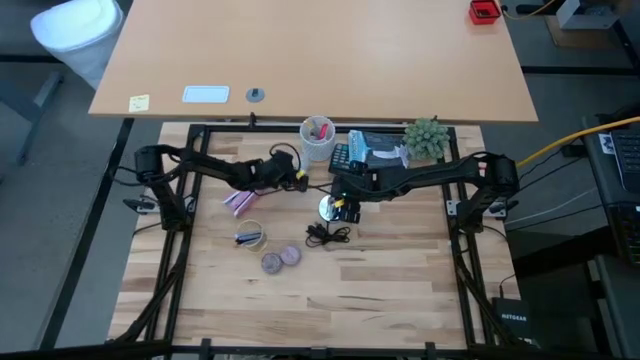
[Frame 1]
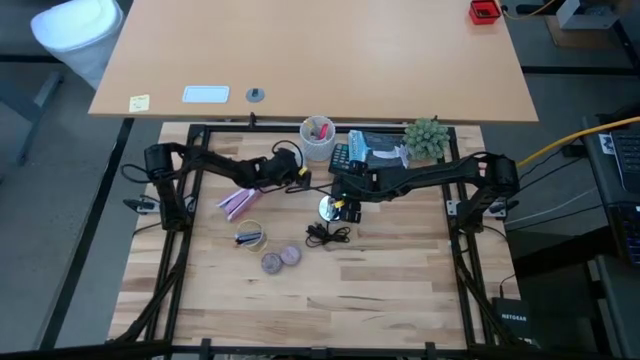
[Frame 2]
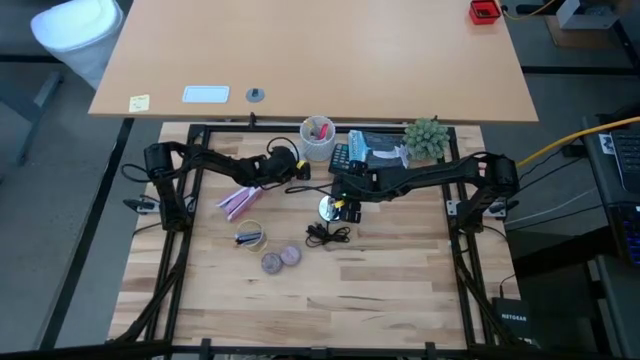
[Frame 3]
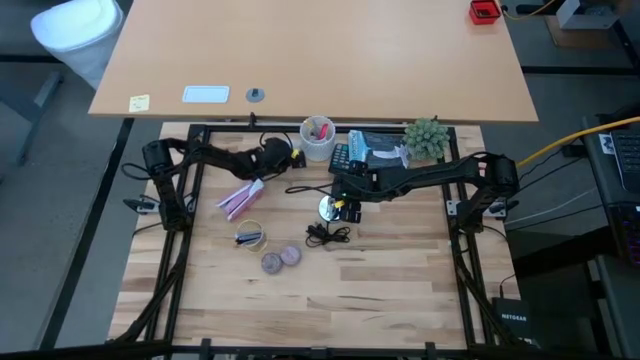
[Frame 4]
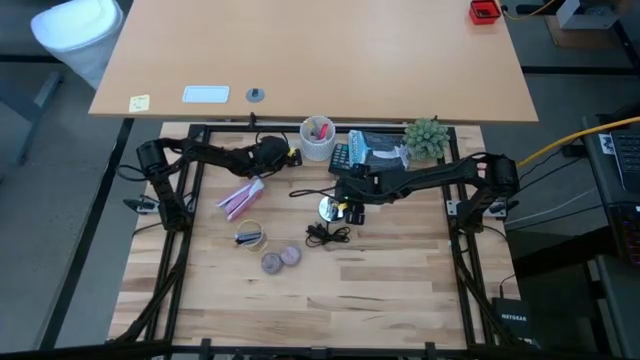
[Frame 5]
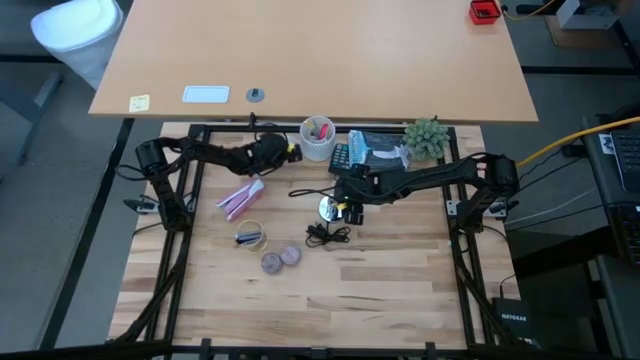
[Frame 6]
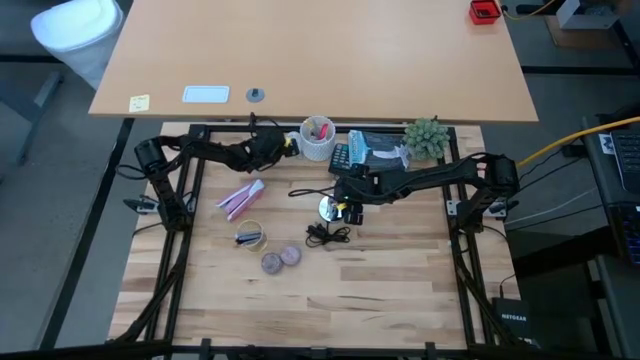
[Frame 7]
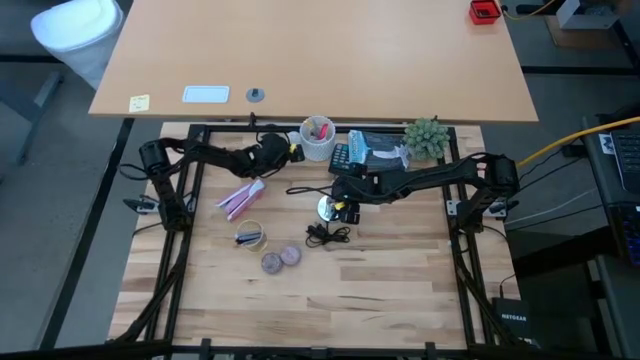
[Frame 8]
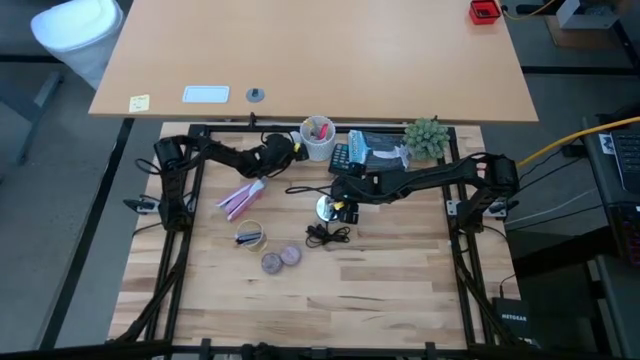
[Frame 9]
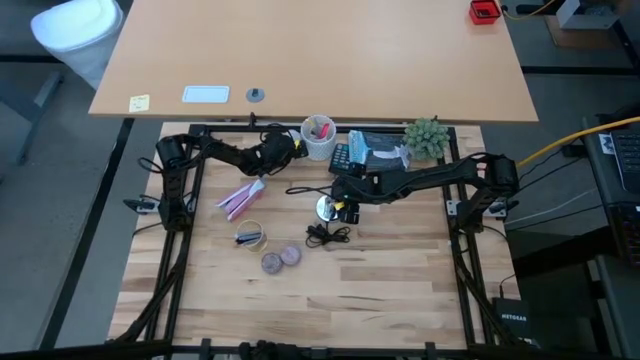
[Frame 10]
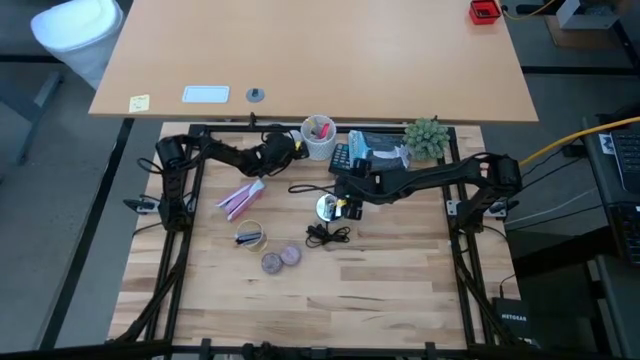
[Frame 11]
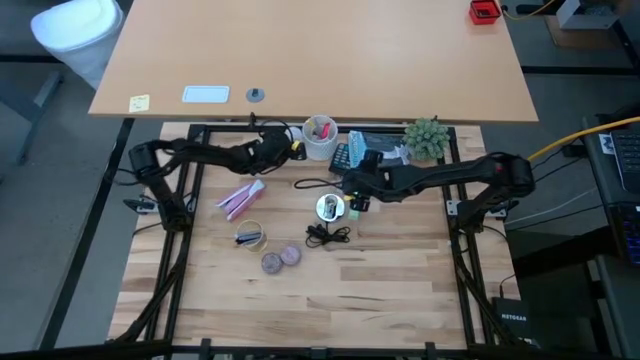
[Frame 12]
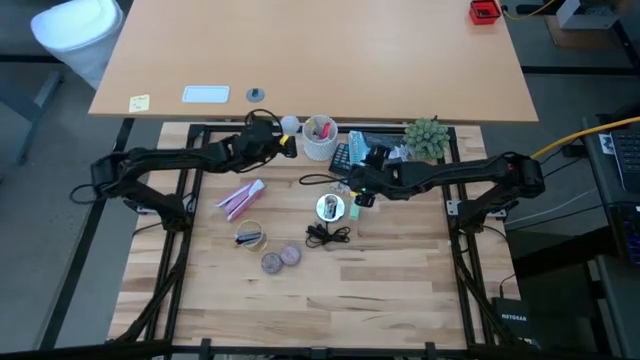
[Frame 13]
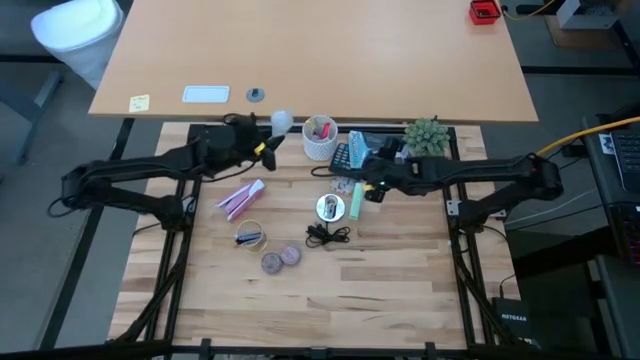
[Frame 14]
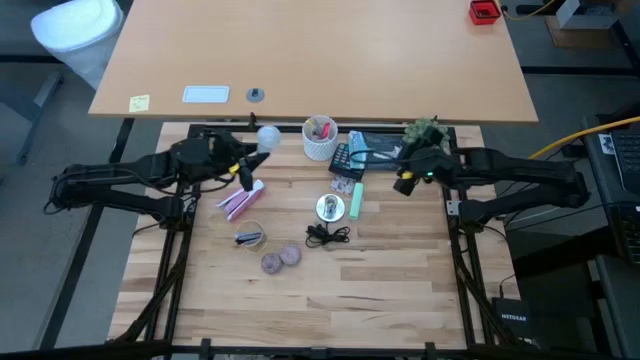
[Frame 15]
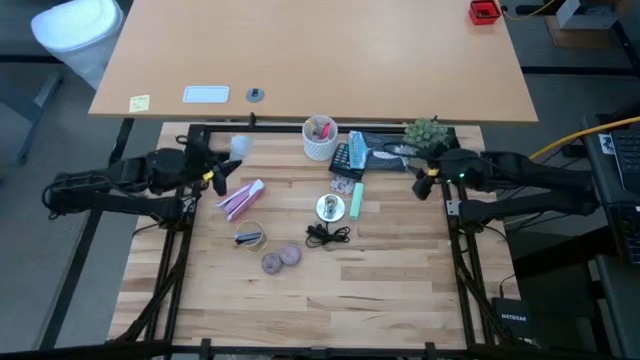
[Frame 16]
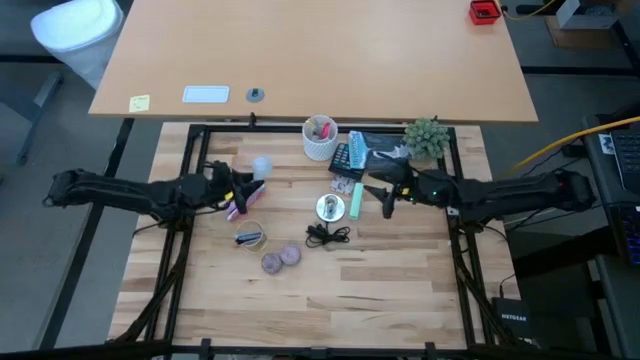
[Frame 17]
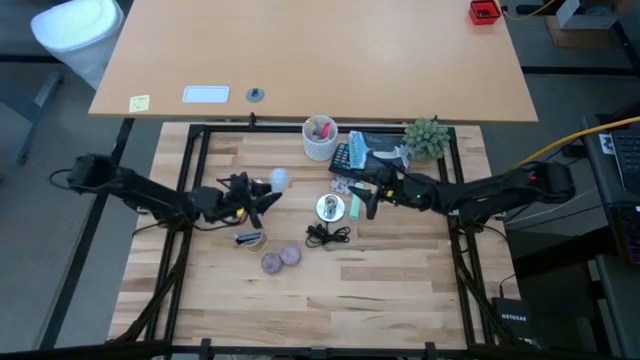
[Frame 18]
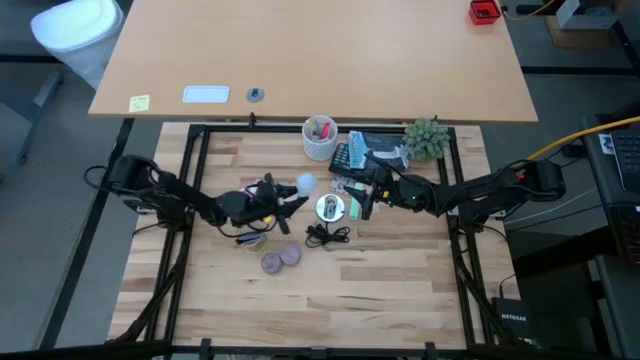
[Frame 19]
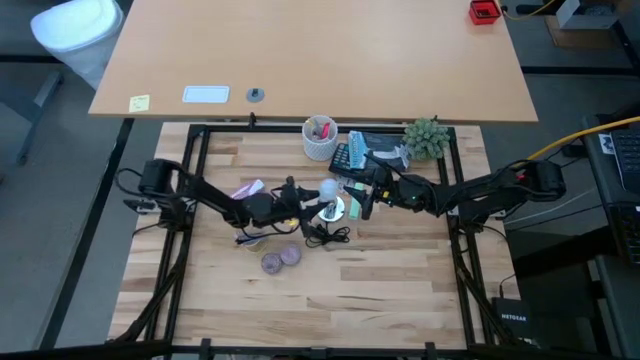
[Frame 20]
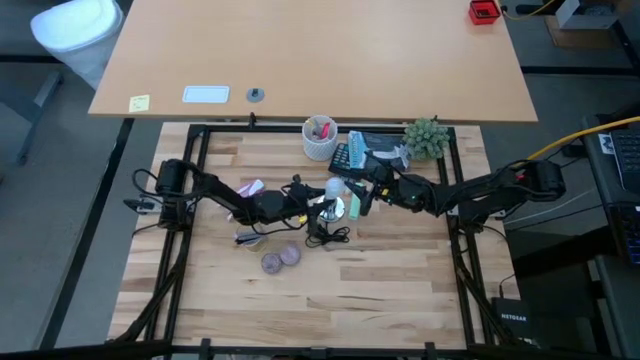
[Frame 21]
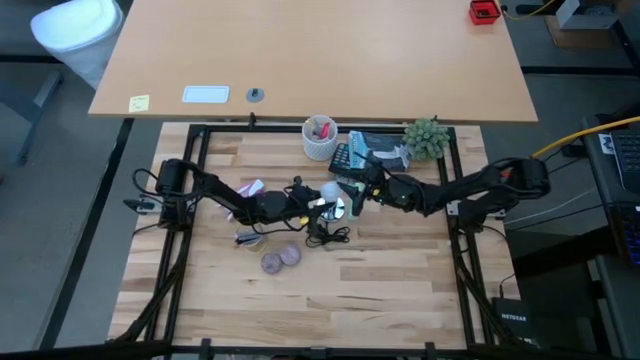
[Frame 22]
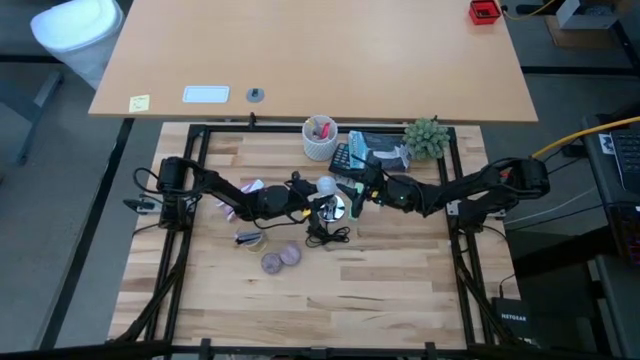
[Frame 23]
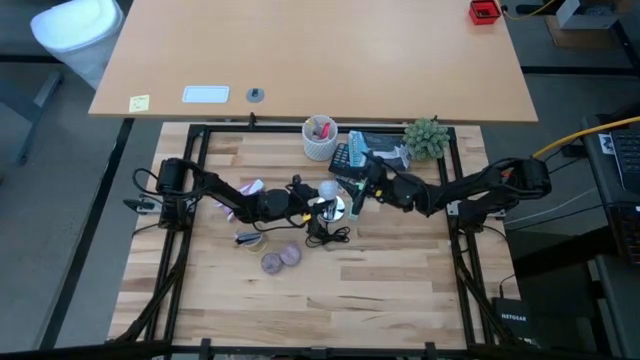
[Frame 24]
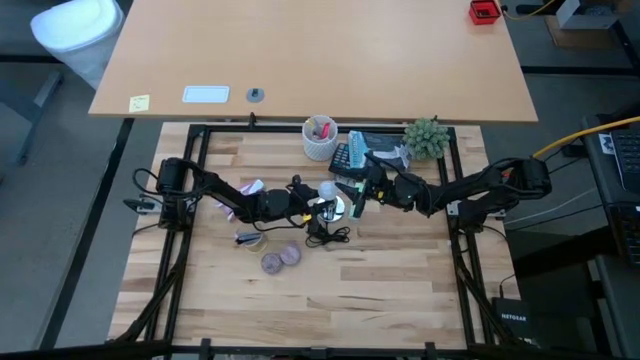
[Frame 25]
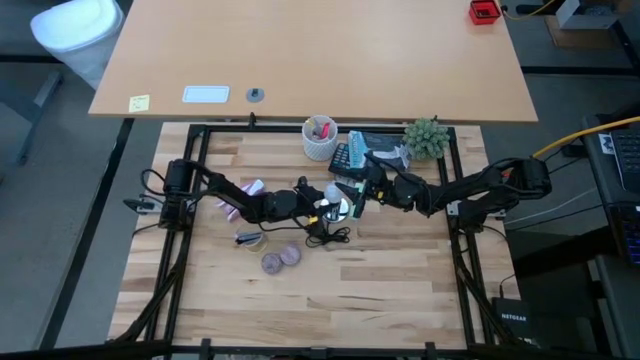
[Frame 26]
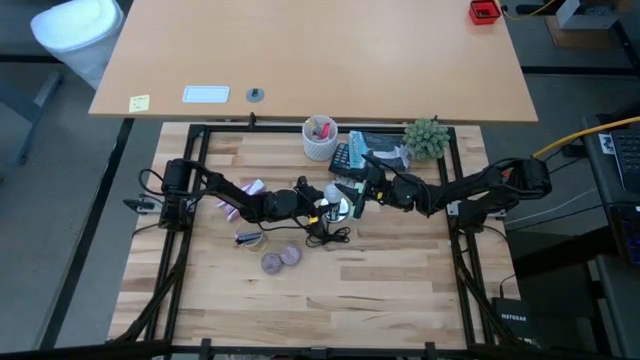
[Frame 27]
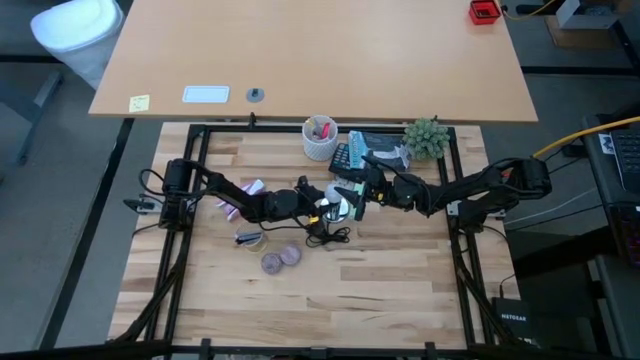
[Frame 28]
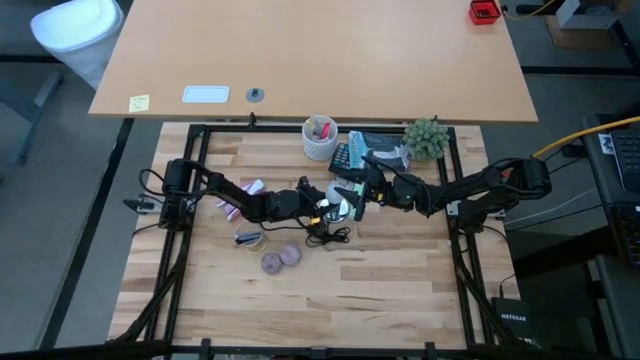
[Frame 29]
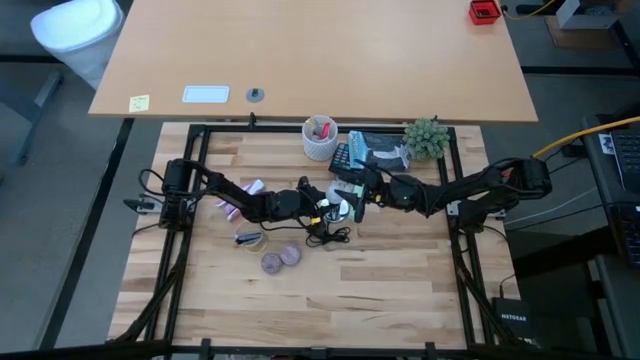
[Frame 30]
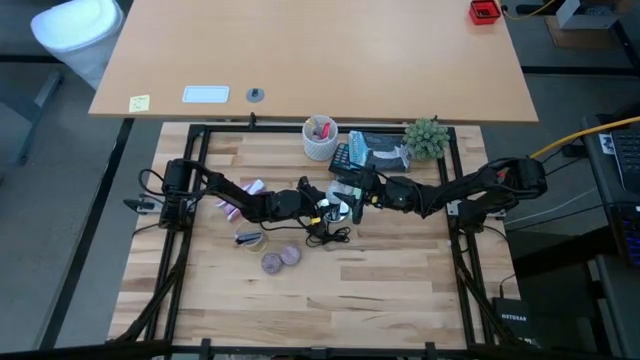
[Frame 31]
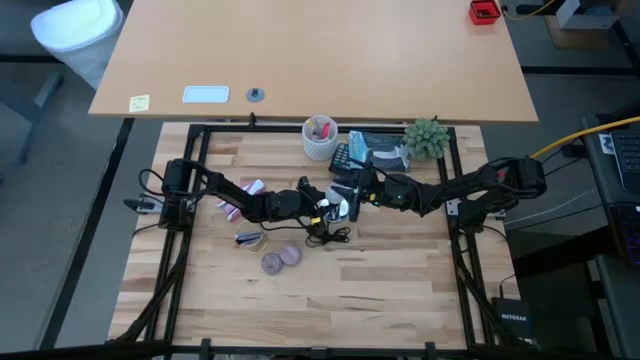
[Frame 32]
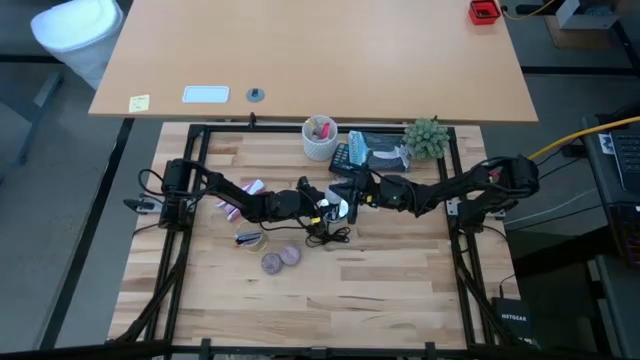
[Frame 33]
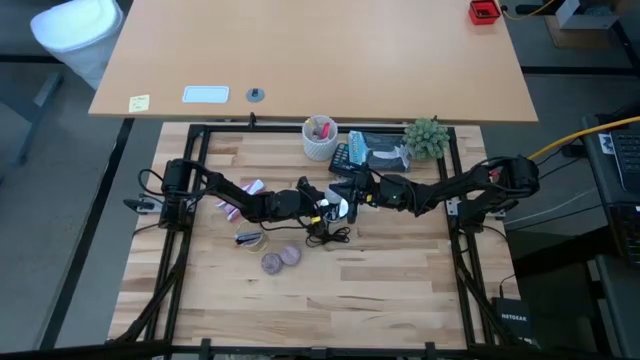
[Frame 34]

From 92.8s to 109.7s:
Task: Screw lightbulb
Insert the white lightbulb into the silver lamp
